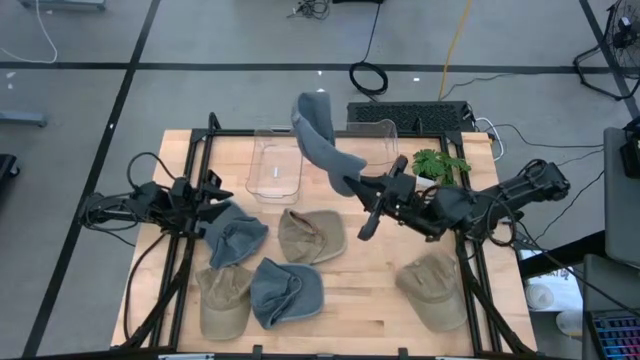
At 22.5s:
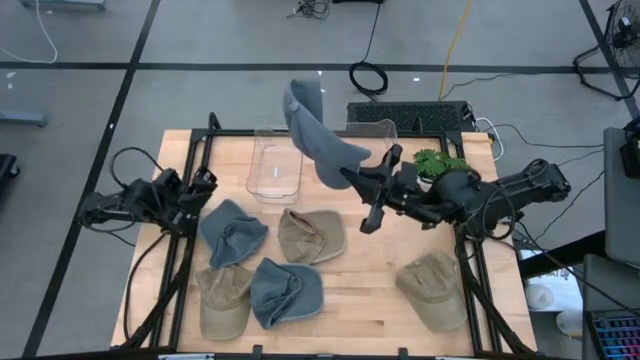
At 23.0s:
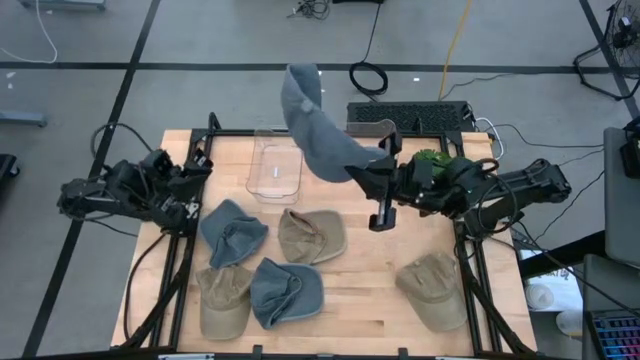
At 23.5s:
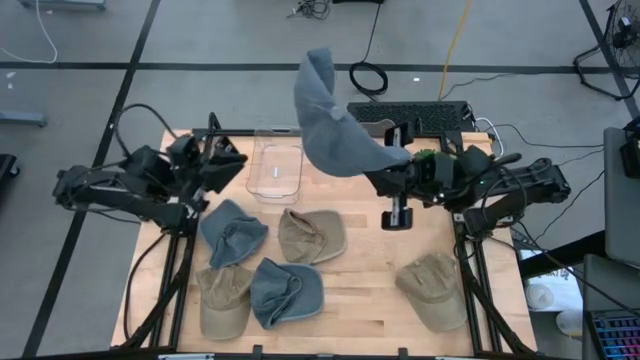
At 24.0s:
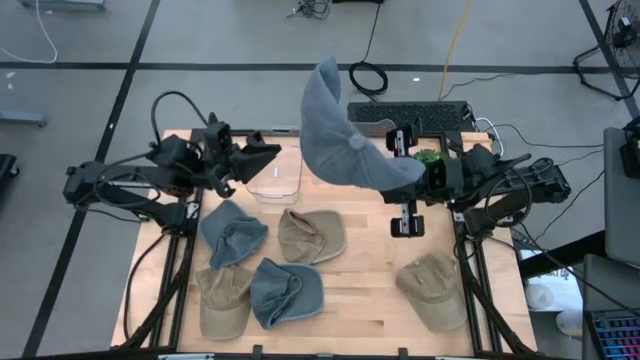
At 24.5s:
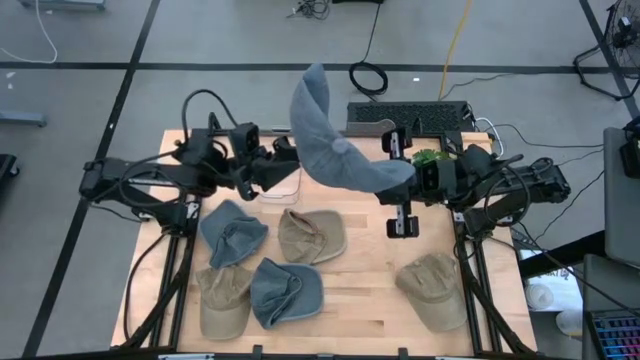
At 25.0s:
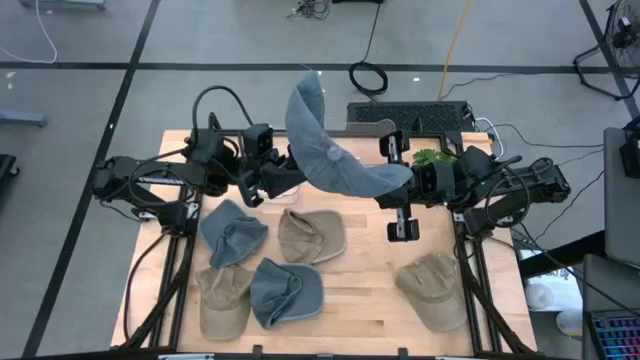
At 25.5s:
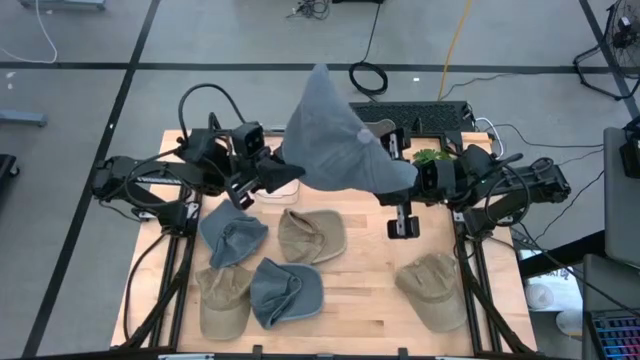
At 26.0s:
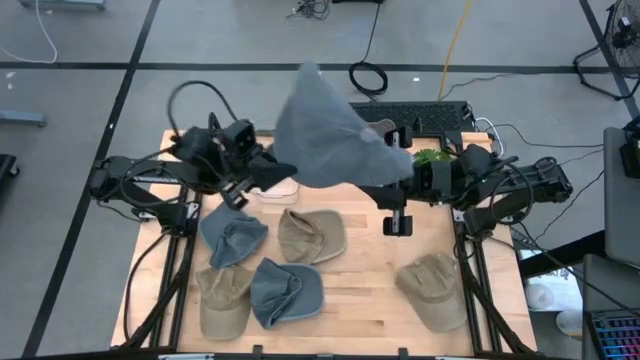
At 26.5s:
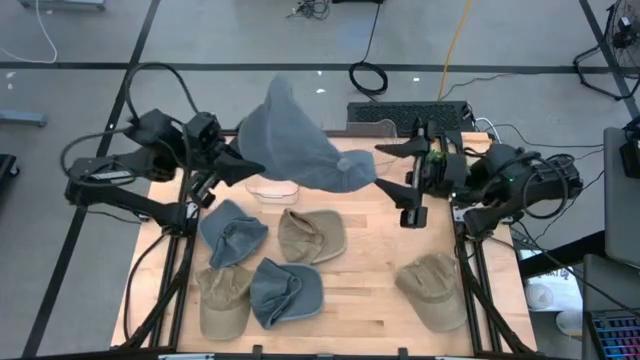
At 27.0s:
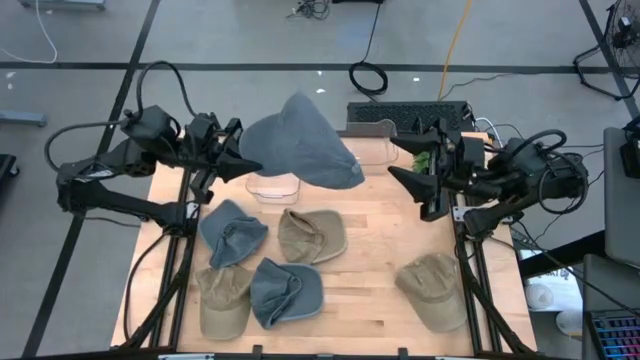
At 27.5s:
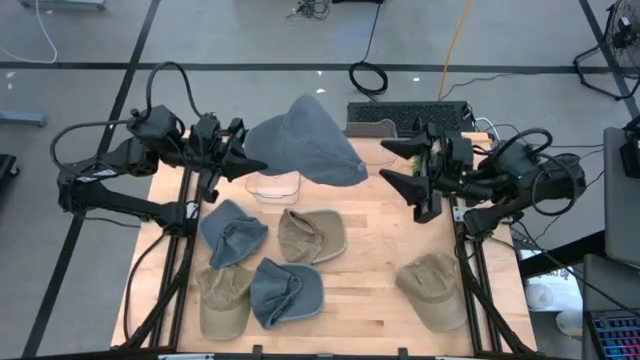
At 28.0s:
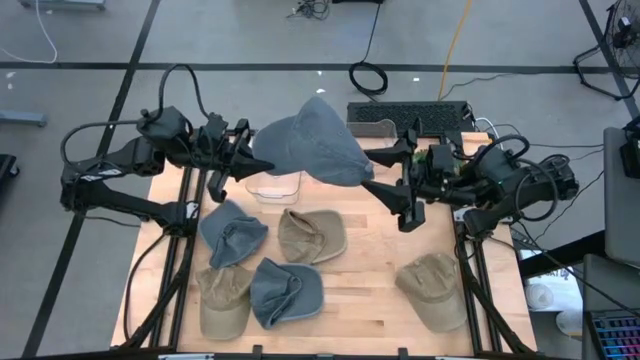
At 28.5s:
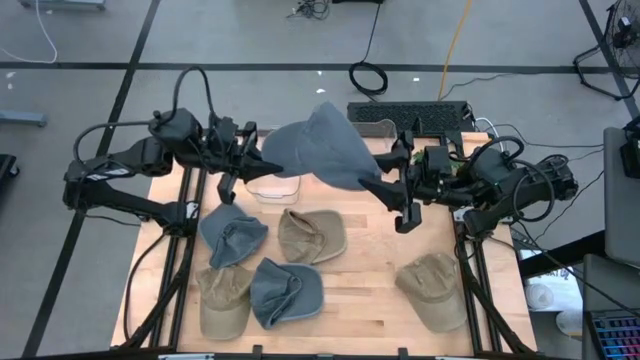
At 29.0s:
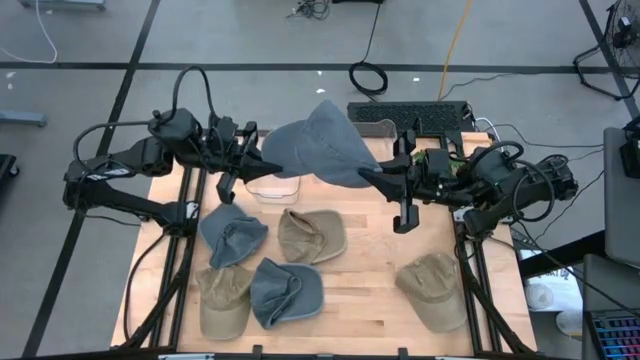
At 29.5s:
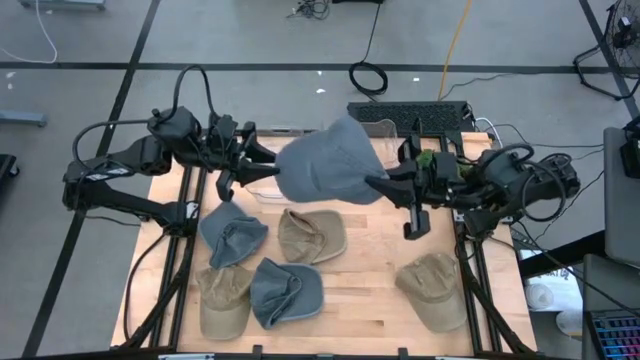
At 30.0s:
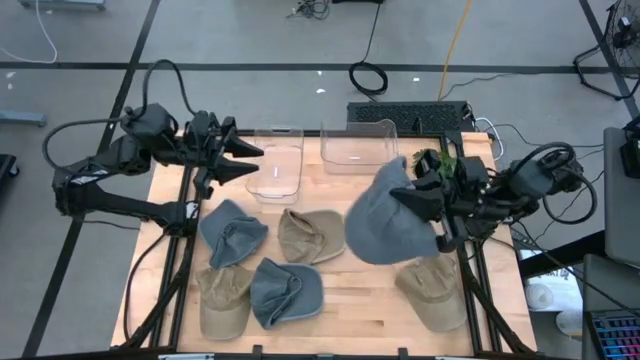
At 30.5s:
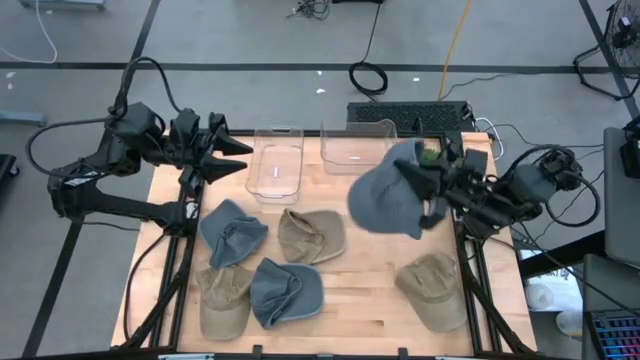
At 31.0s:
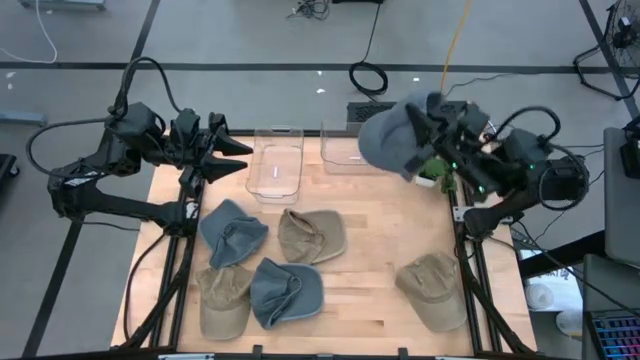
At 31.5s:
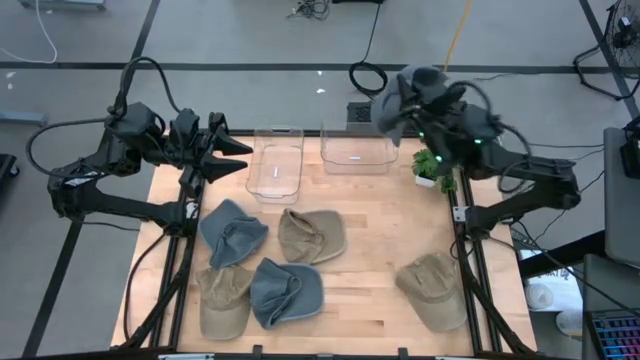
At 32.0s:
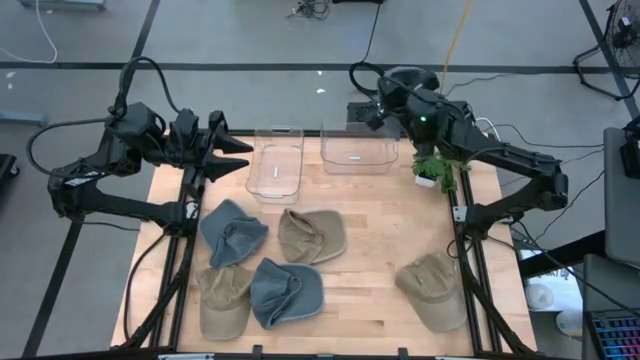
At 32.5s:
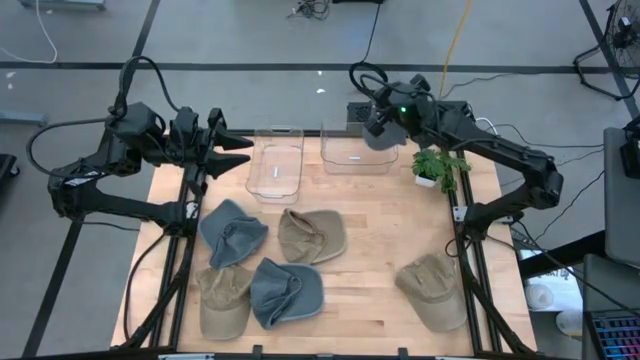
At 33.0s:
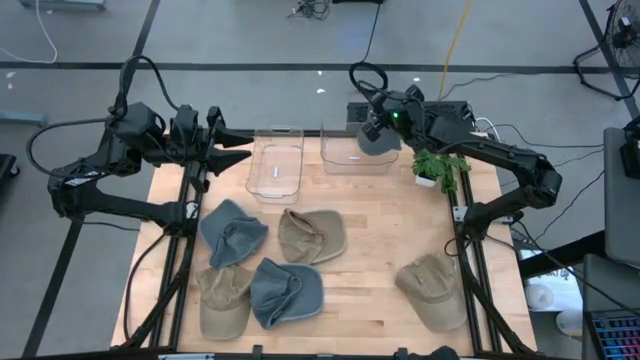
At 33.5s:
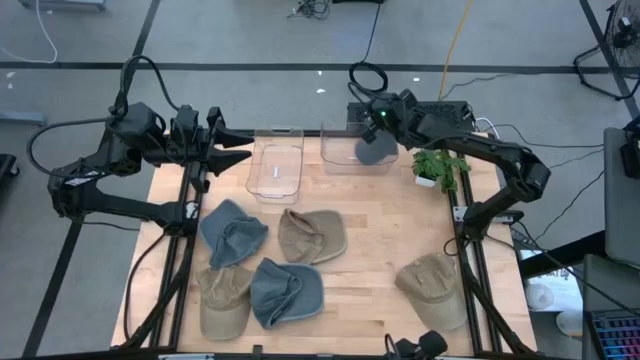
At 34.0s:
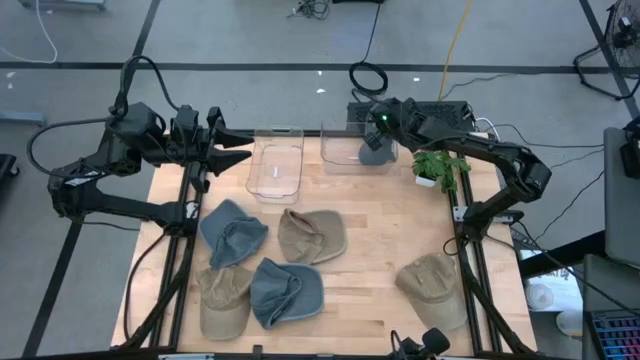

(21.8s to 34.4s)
Task: Pick & Place hat
Put the top right blue cap into the right transparent bin

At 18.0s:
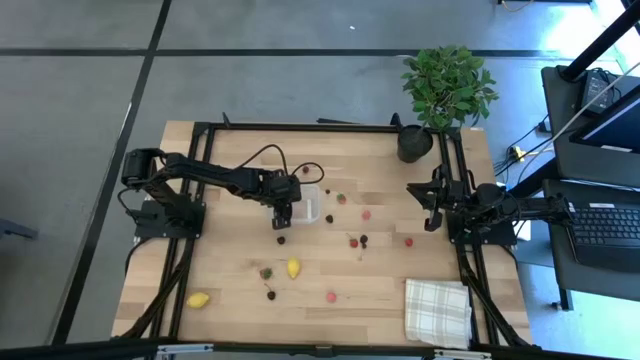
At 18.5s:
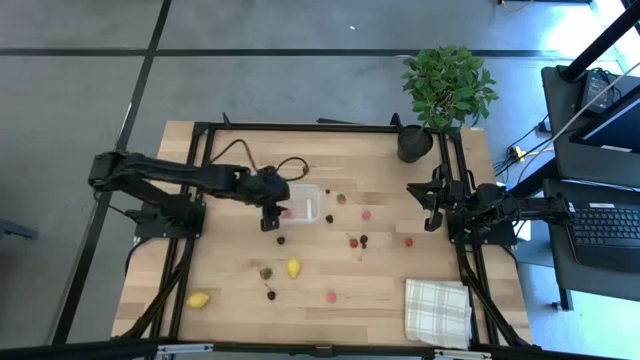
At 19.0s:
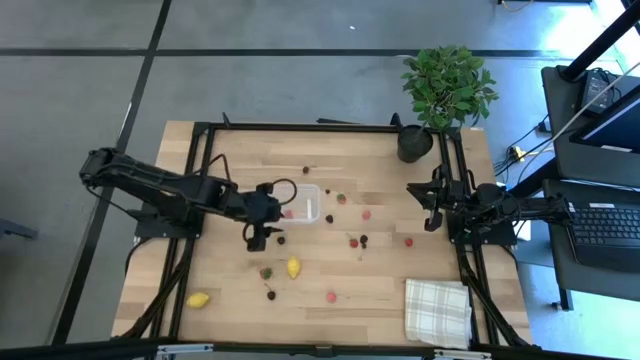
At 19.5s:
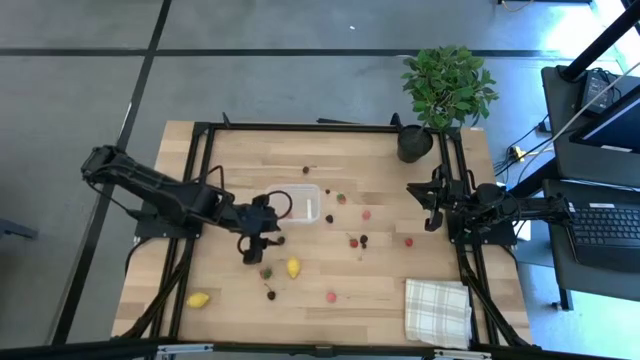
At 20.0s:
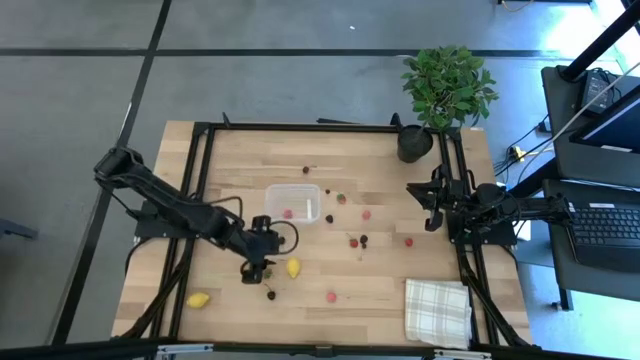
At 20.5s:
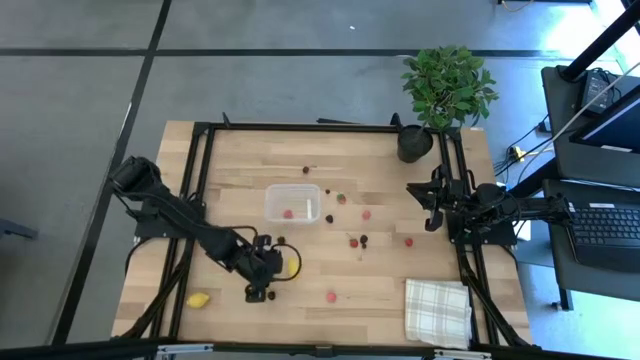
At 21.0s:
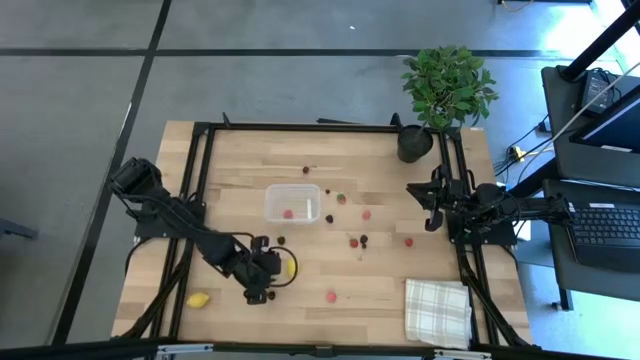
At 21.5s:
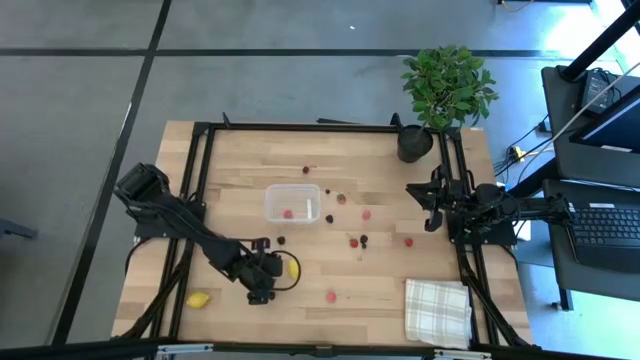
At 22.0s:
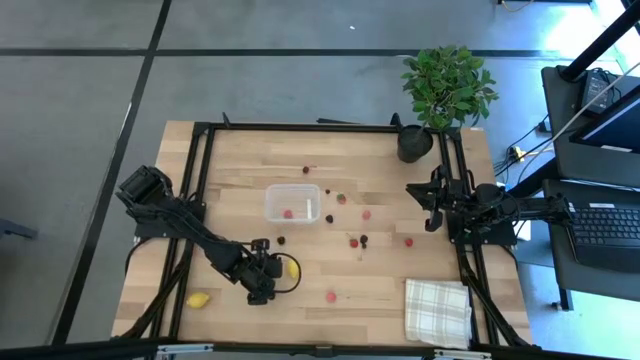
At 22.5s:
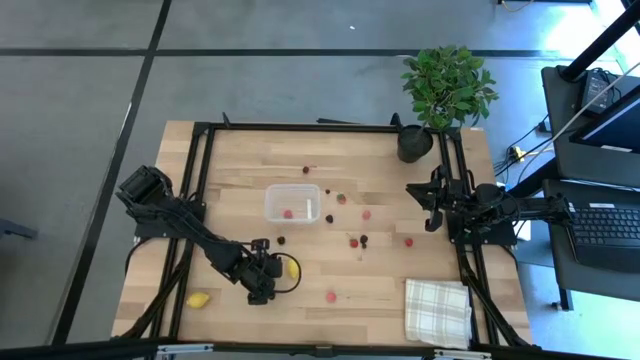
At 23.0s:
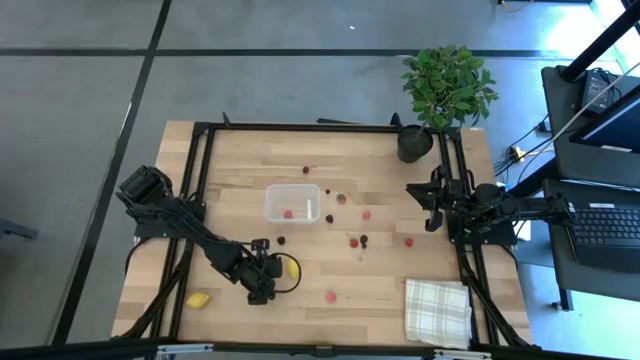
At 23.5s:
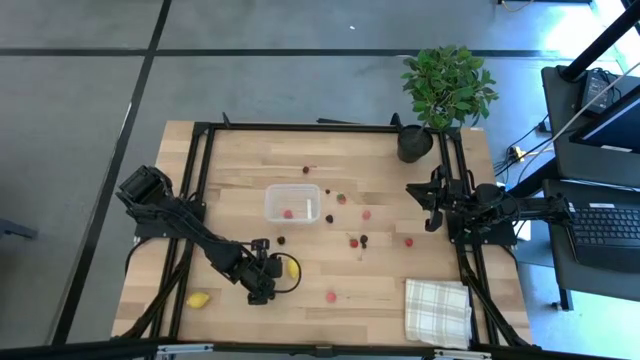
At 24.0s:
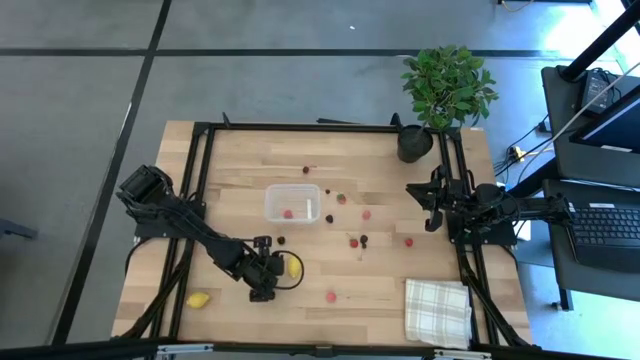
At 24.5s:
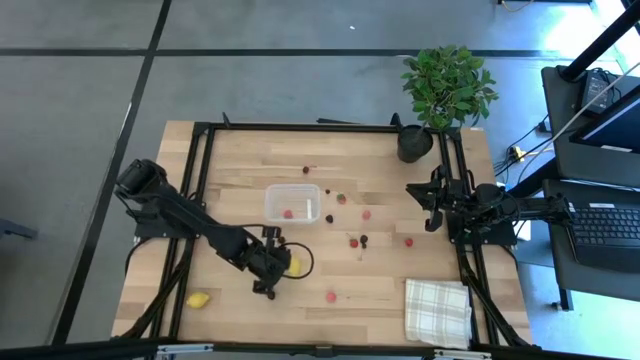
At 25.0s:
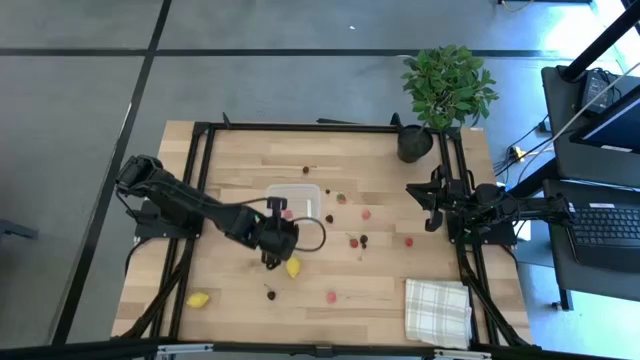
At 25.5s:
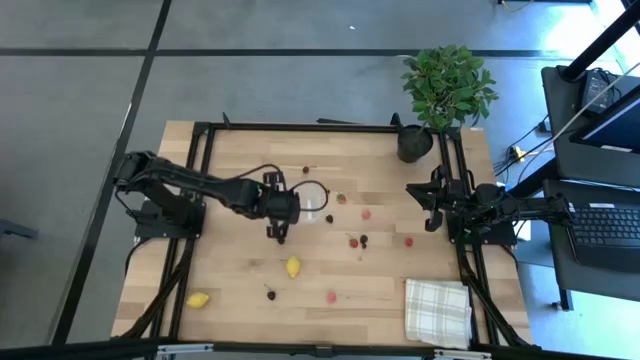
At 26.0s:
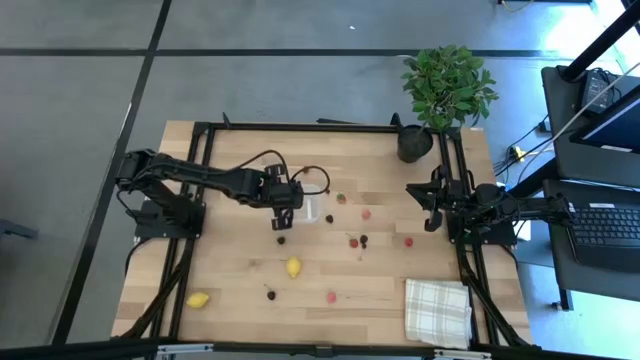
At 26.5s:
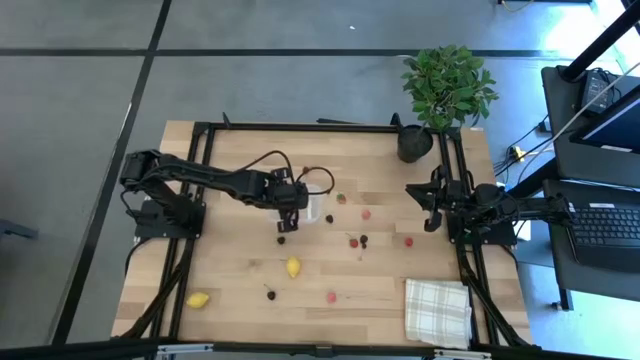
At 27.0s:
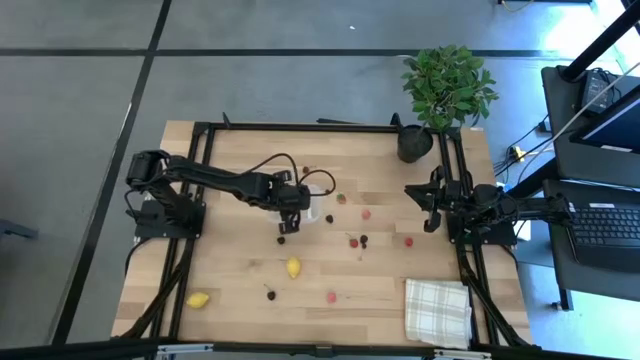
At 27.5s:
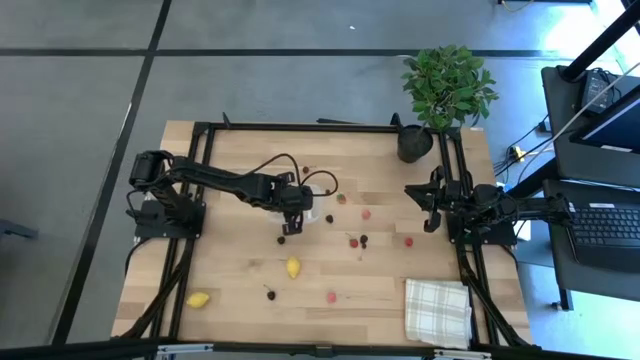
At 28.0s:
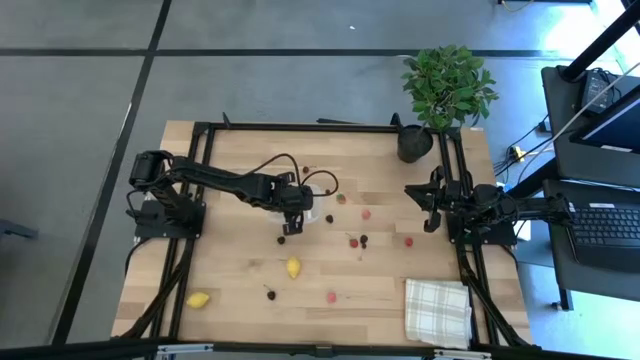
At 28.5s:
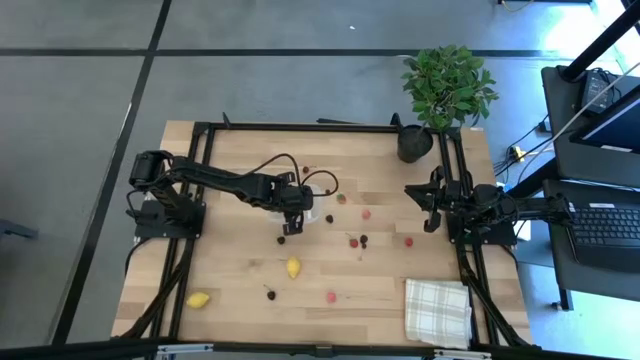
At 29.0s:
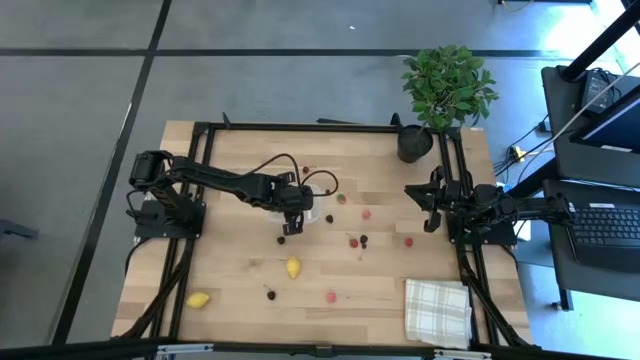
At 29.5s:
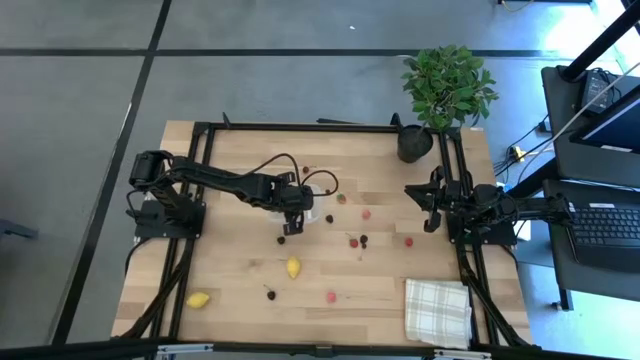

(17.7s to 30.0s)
Task: Pick and placing Produce into tupperware
Put the bottom strawberry into the transparent bin
